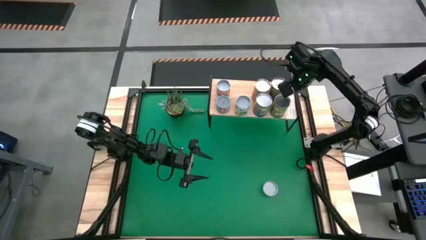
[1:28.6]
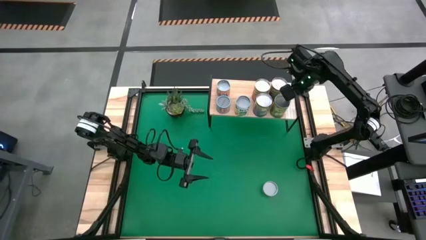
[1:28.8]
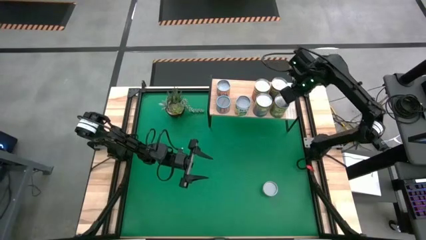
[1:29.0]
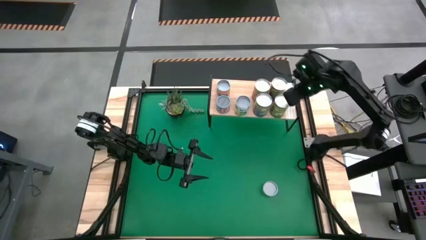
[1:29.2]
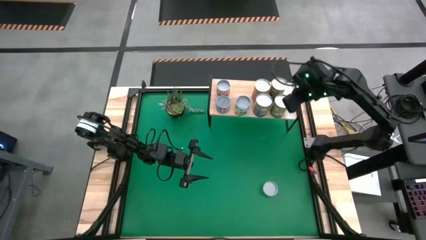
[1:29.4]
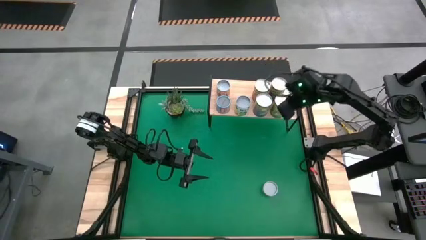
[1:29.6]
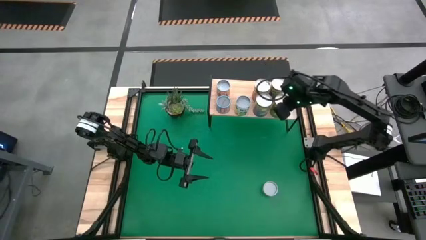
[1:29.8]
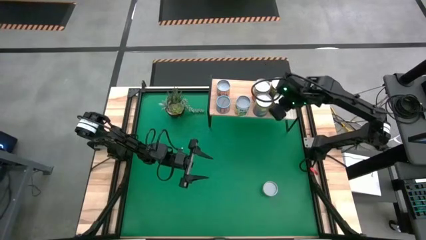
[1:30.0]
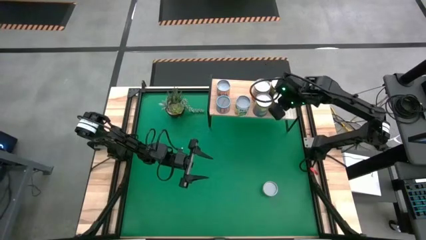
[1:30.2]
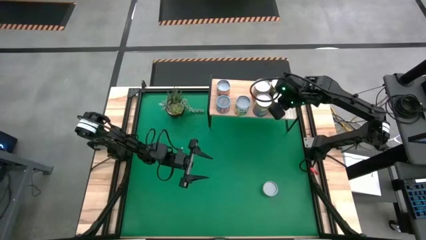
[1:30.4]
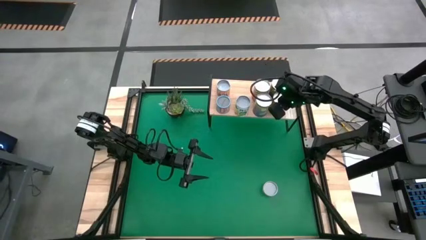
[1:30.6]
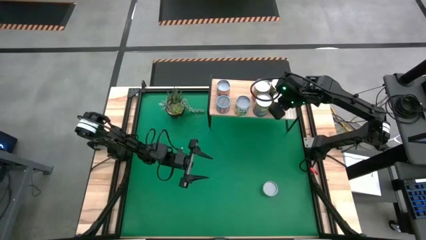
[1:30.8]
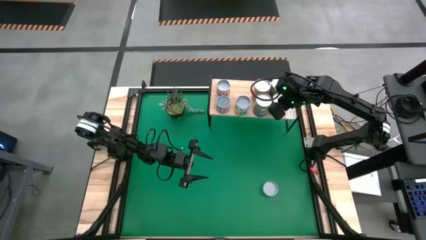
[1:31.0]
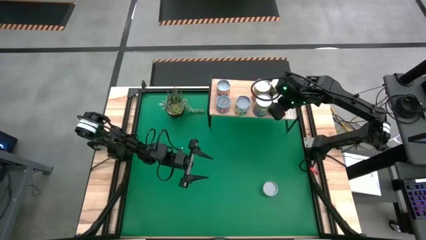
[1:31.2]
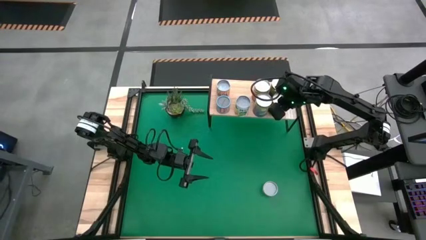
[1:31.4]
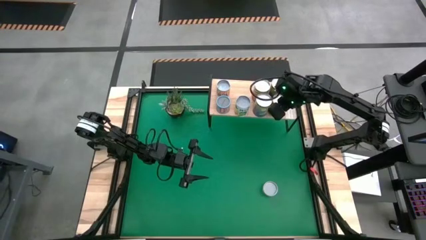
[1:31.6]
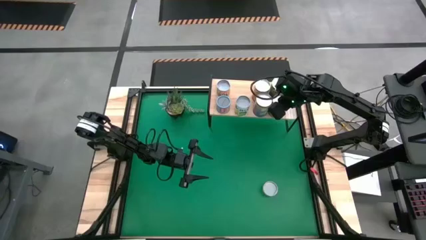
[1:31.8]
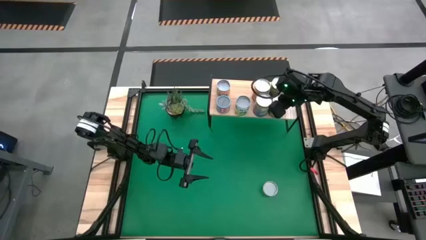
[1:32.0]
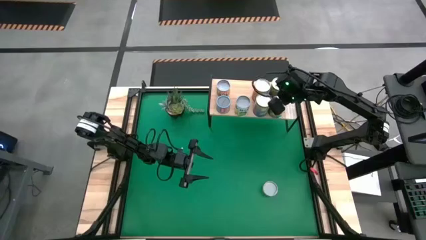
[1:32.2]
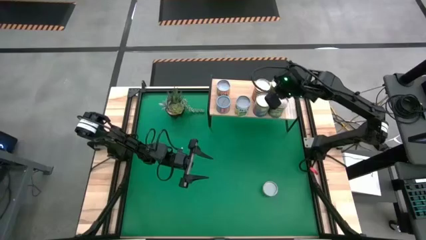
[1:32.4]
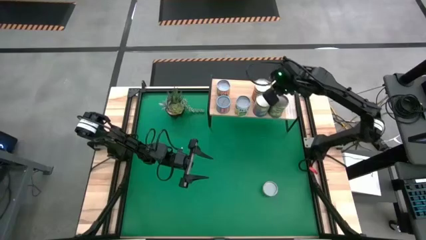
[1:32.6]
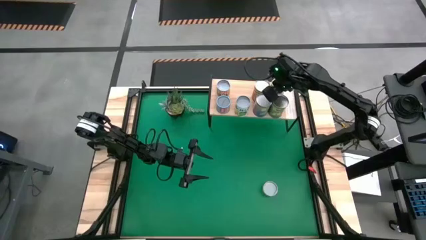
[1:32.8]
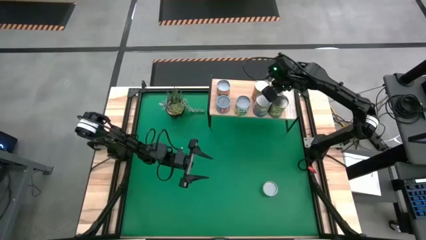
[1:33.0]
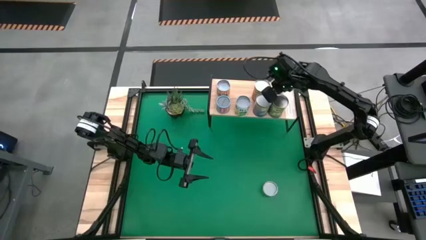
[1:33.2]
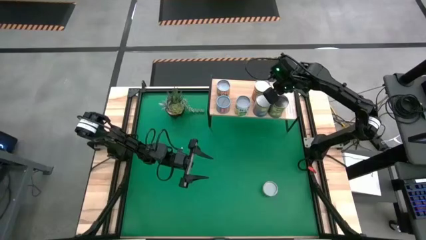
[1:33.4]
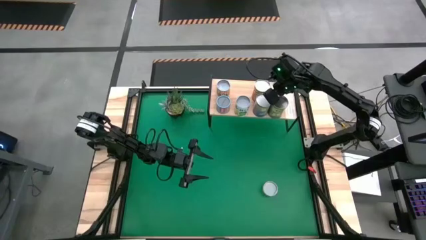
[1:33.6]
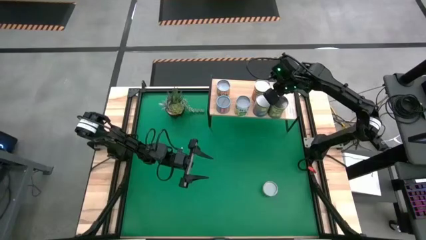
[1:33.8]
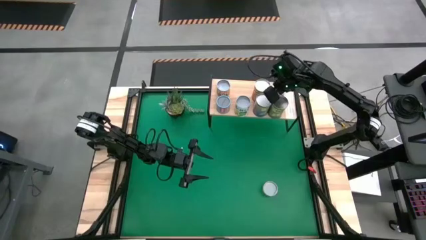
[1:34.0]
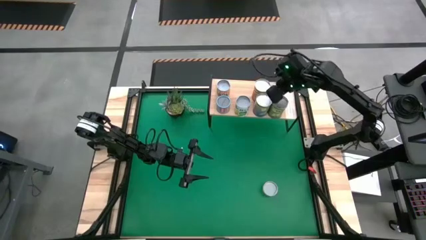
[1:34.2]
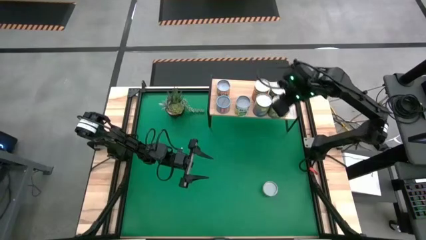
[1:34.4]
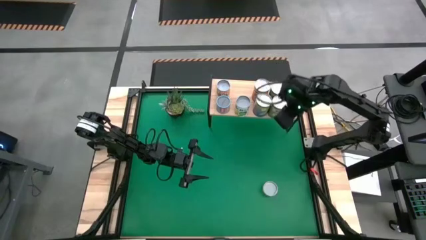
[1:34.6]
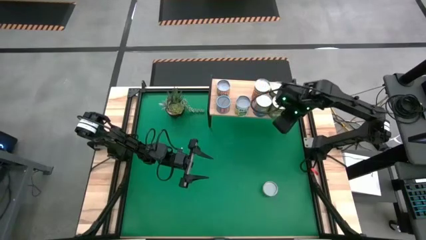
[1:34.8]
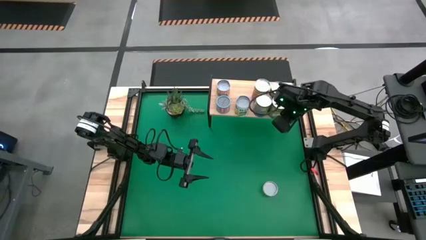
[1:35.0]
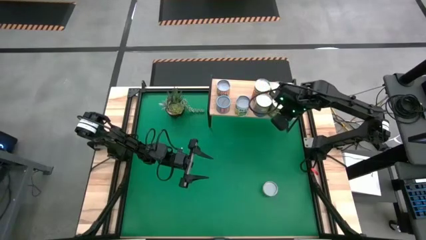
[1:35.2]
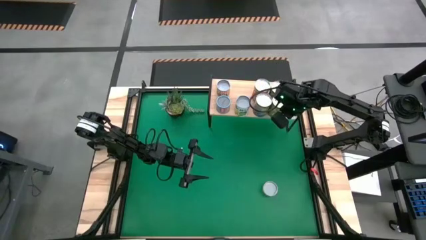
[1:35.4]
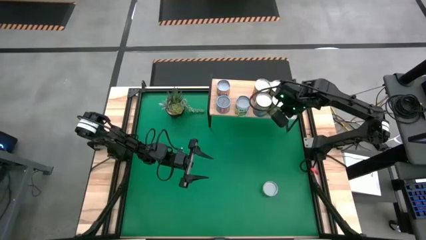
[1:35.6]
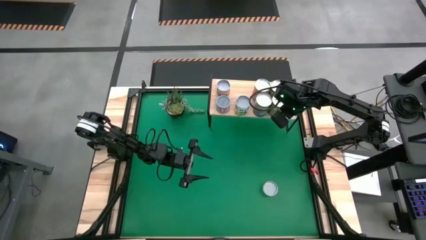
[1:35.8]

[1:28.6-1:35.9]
Task: Pick and place cans onto a shelf
Adjust the cans on the shelf

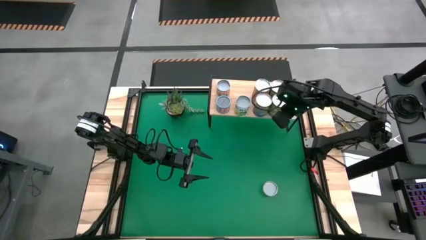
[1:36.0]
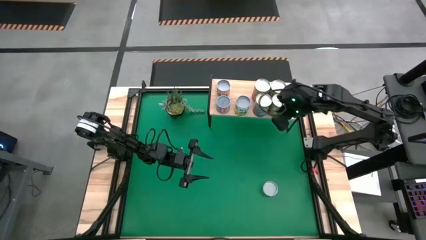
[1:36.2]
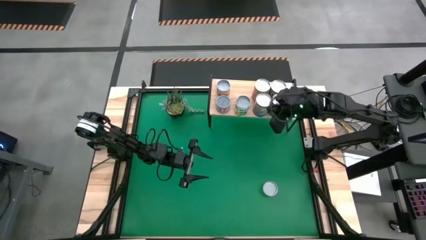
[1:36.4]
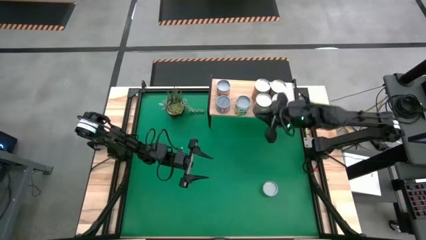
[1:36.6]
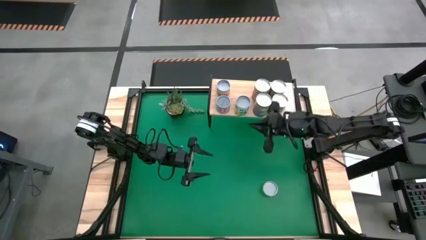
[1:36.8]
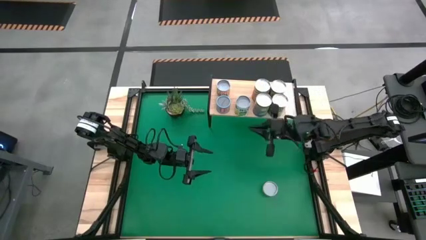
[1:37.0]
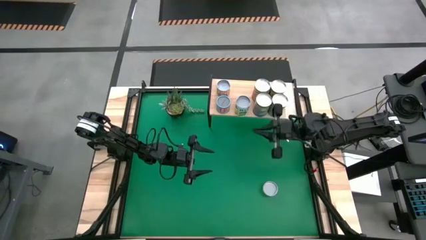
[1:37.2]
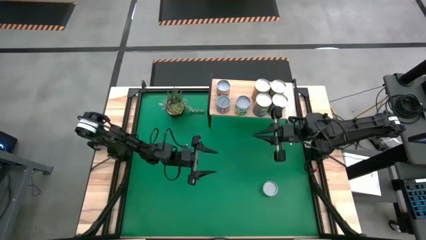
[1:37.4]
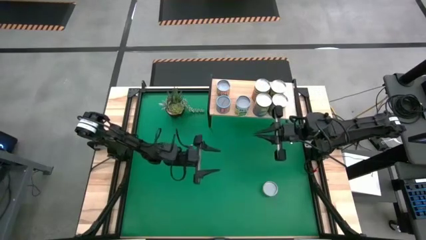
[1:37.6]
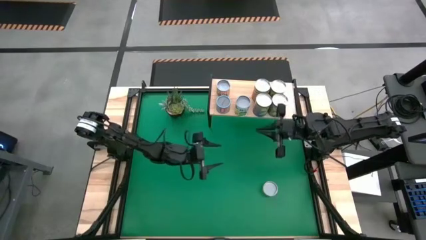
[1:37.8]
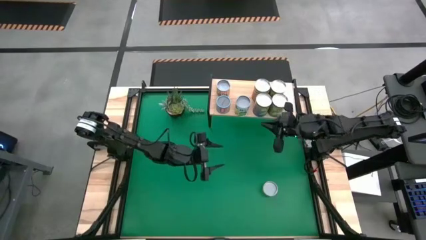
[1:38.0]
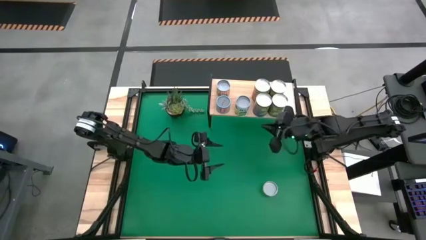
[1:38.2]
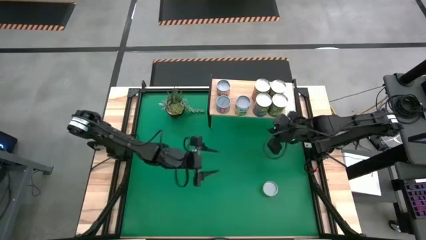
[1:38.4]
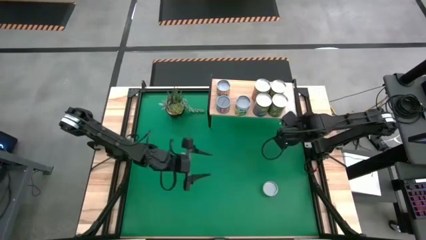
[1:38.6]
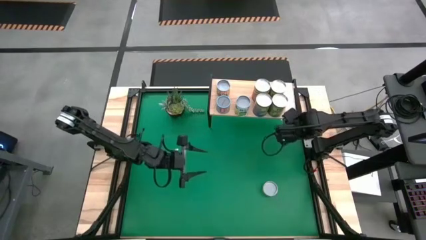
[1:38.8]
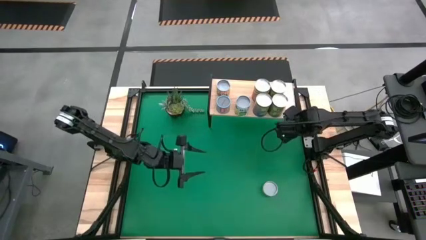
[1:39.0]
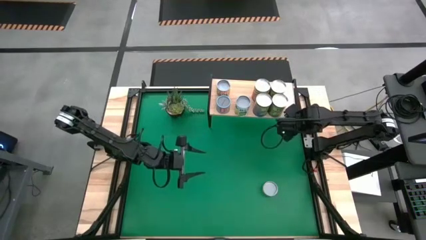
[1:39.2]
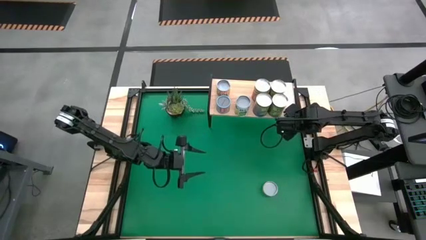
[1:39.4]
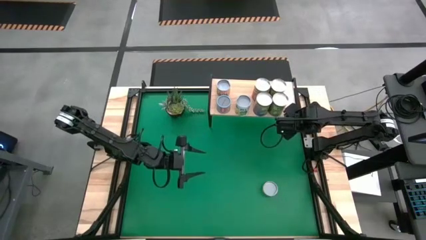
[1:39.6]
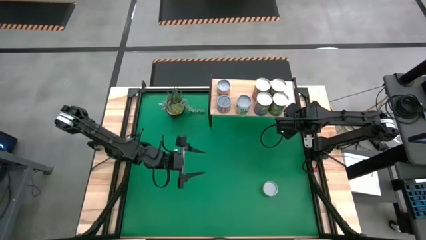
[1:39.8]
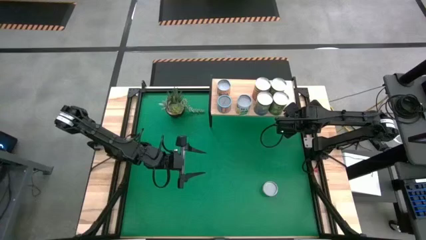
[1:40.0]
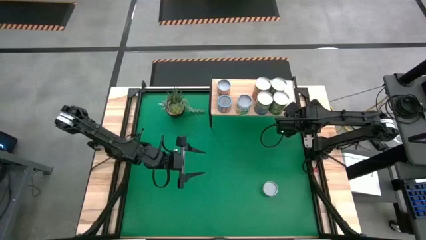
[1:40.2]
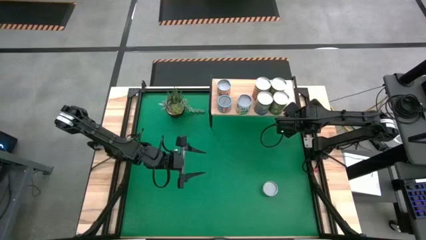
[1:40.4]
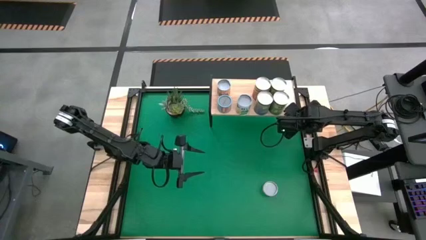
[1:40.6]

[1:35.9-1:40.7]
Adjust the shelf
